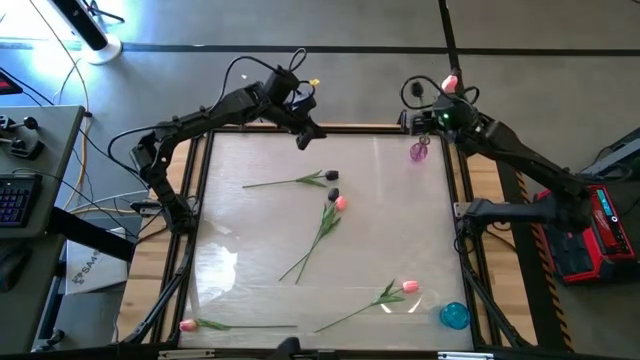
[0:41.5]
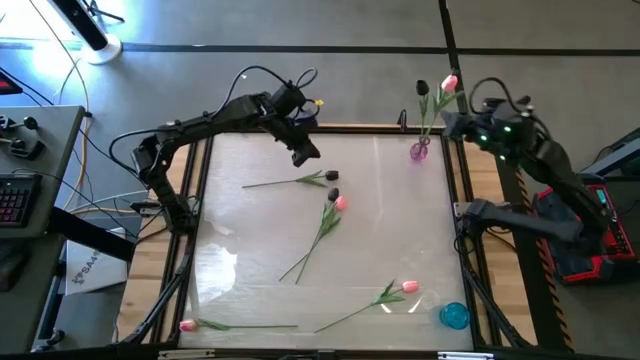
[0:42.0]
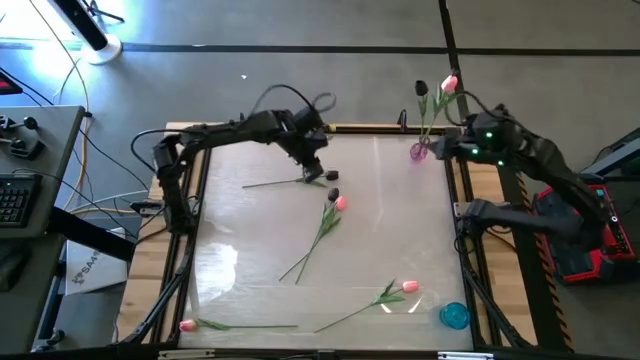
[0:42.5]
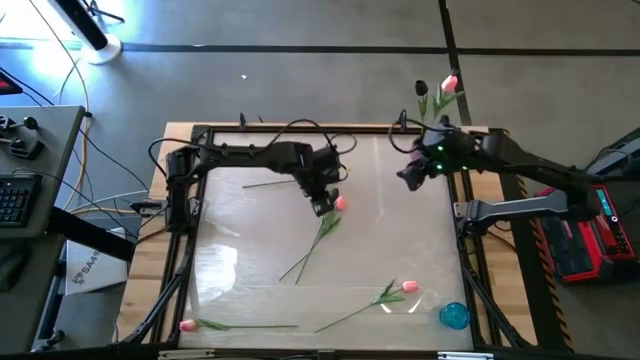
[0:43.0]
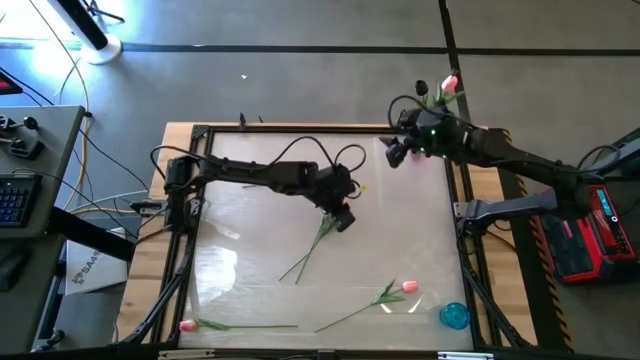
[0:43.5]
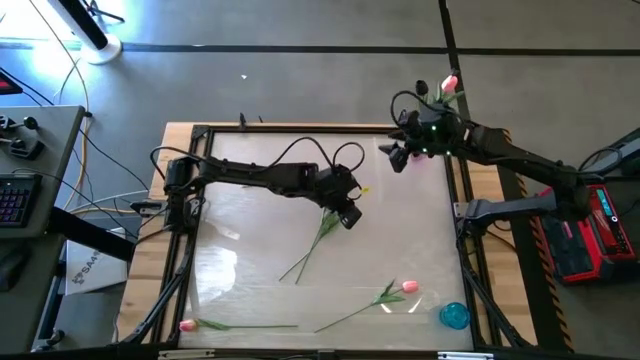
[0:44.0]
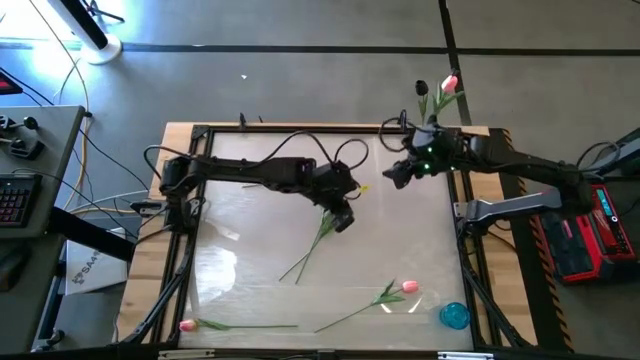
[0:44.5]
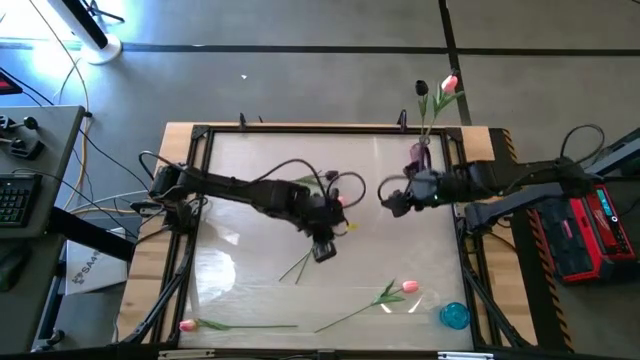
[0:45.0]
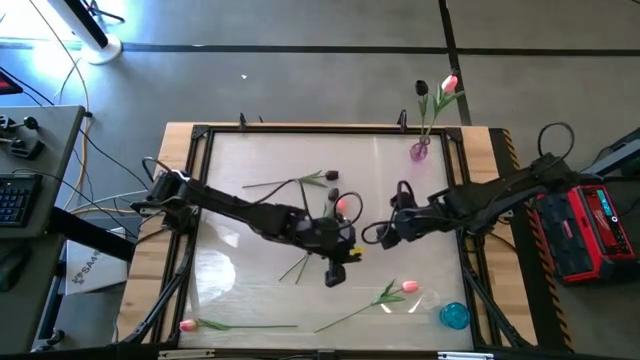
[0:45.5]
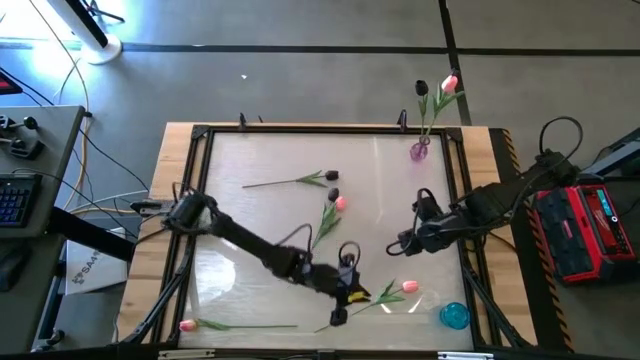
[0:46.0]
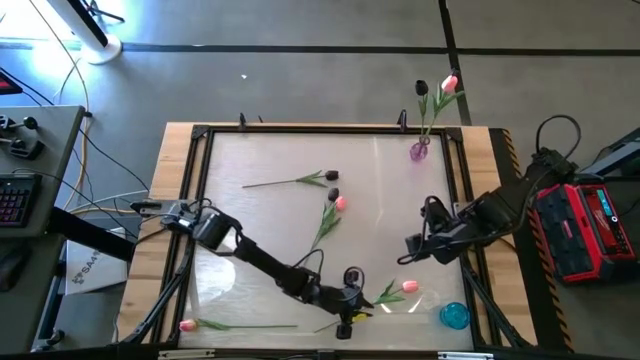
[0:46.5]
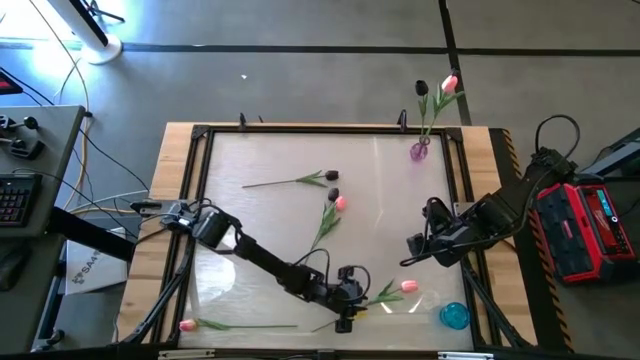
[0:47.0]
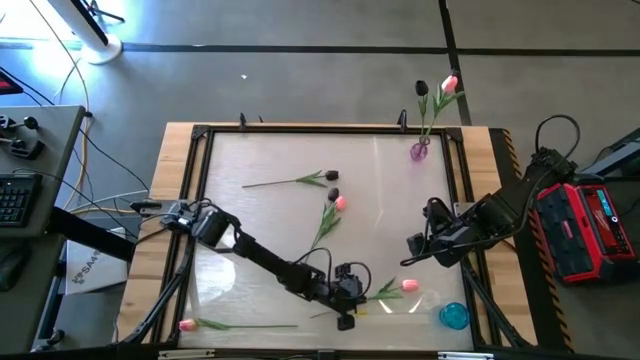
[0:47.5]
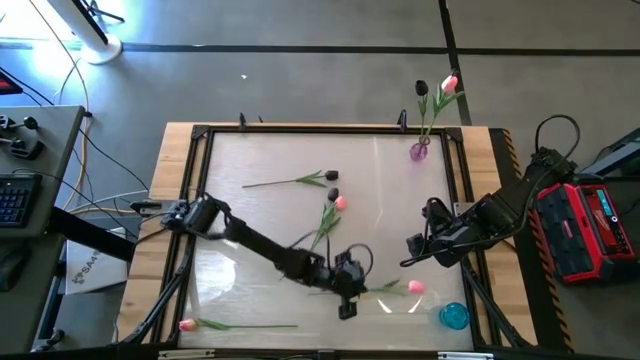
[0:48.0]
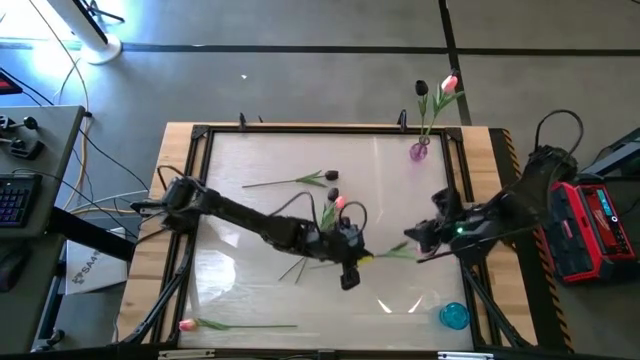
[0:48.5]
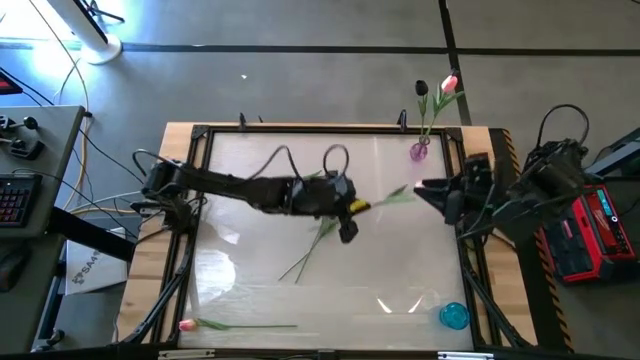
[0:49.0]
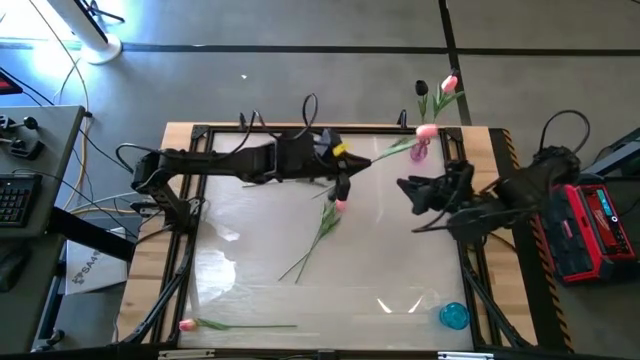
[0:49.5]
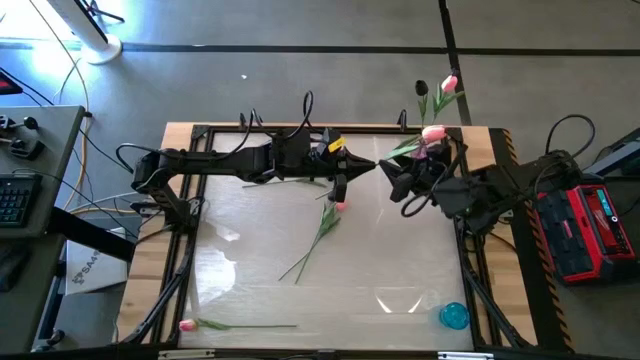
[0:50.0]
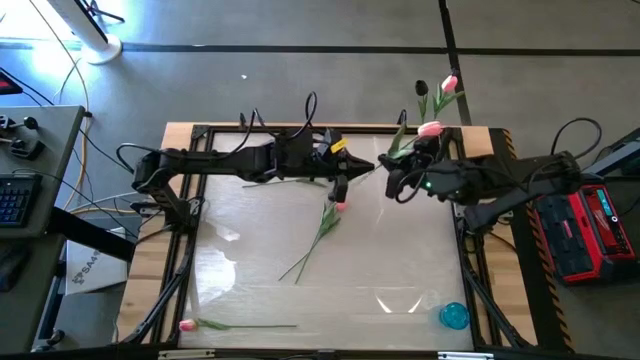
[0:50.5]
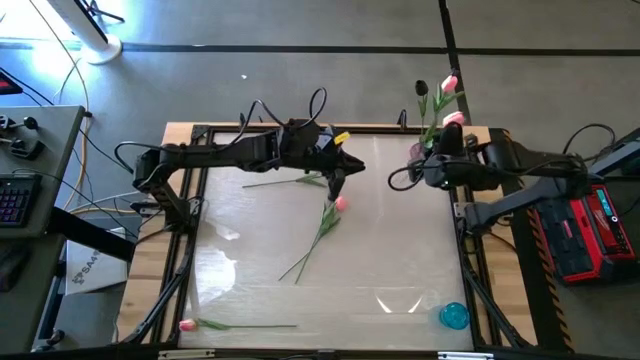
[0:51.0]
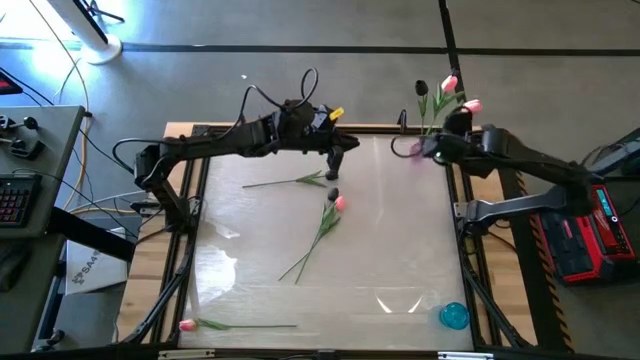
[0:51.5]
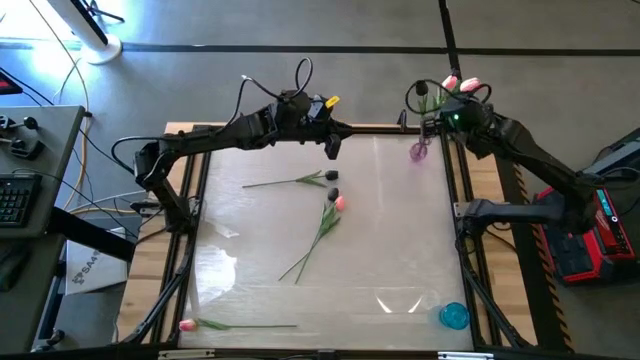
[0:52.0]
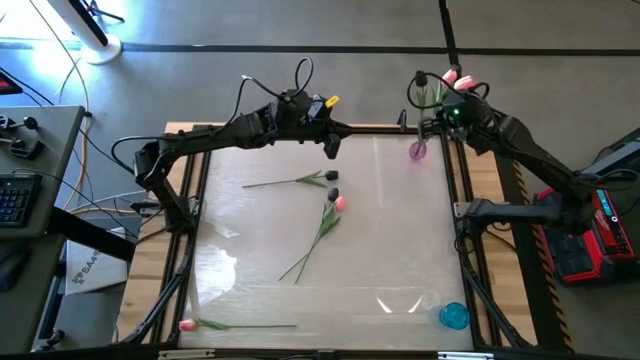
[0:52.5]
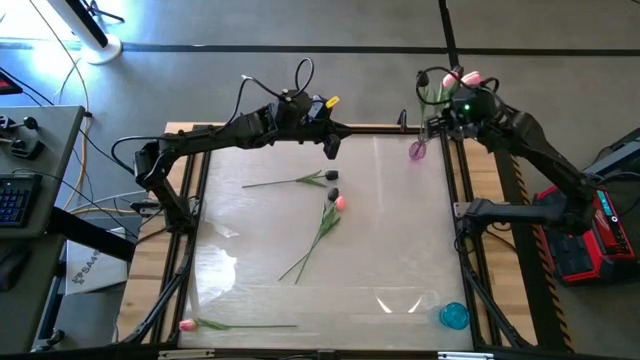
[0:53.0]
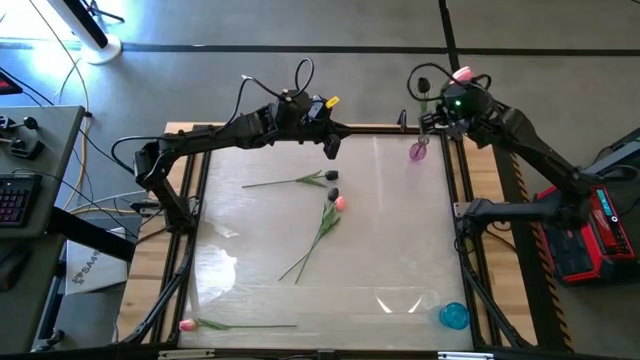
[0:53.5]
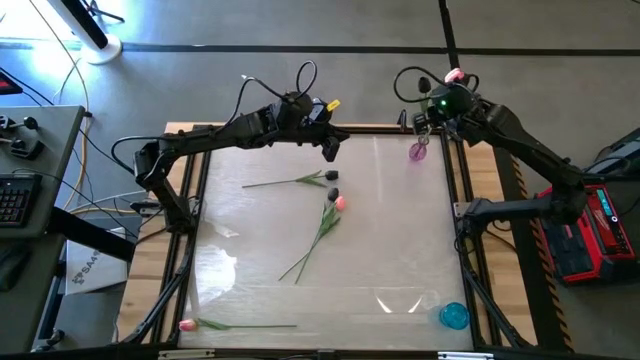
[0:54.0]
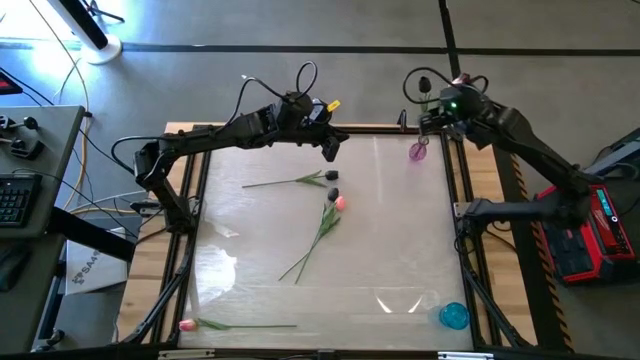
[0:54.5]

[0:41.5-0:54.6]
Task: Sort flowers into vase by color
Put the bottom right pink flower into the purple vase

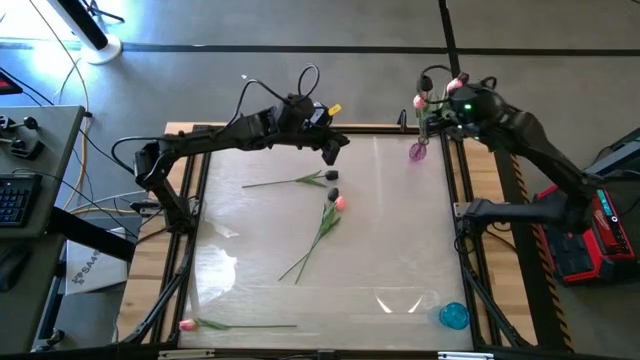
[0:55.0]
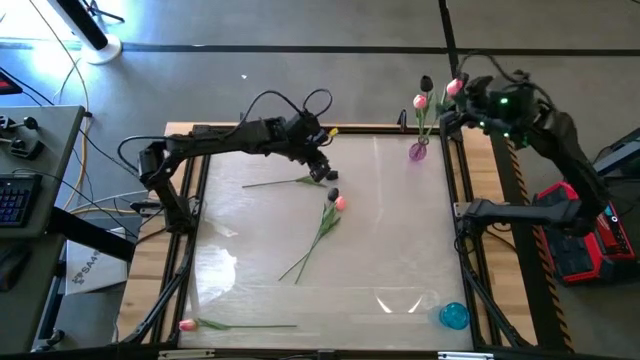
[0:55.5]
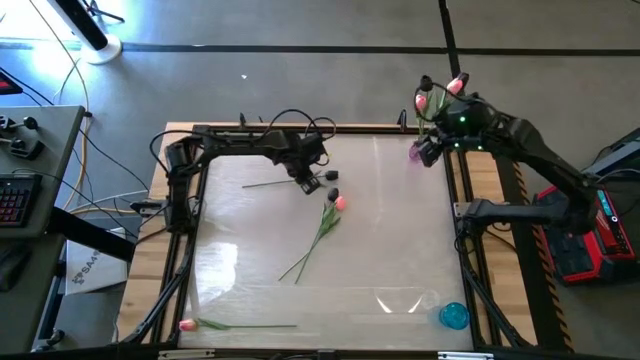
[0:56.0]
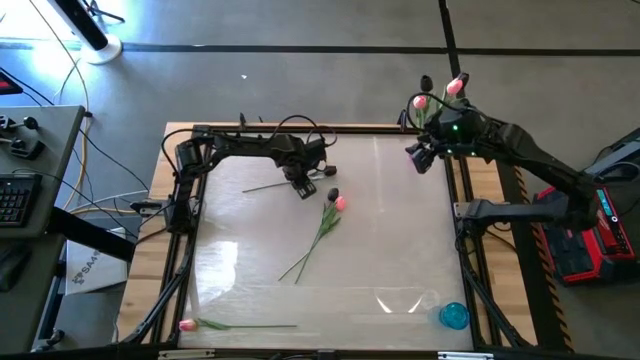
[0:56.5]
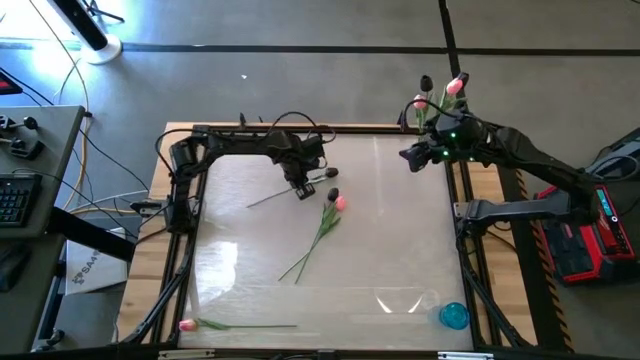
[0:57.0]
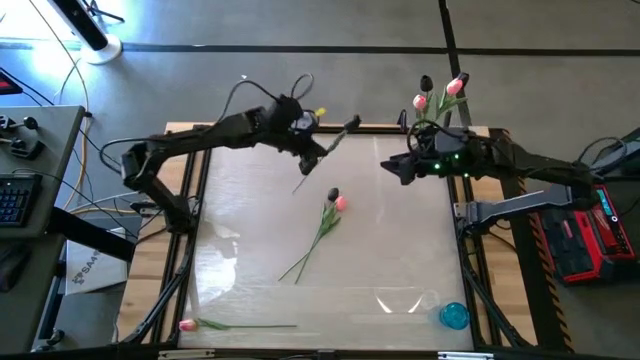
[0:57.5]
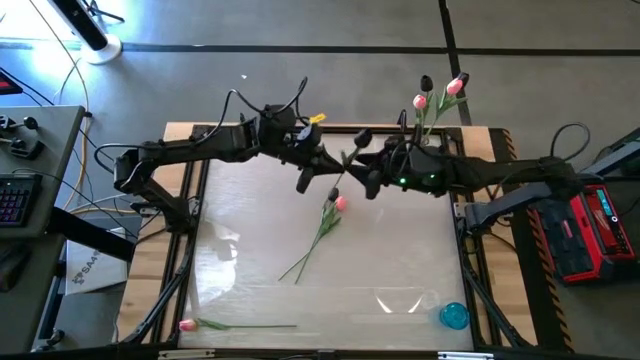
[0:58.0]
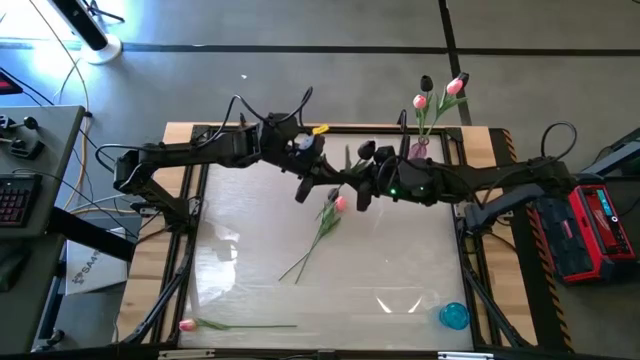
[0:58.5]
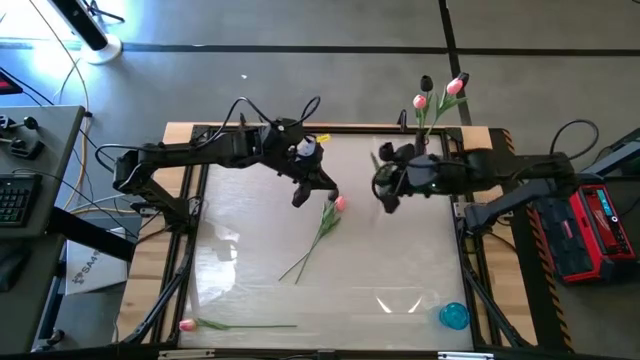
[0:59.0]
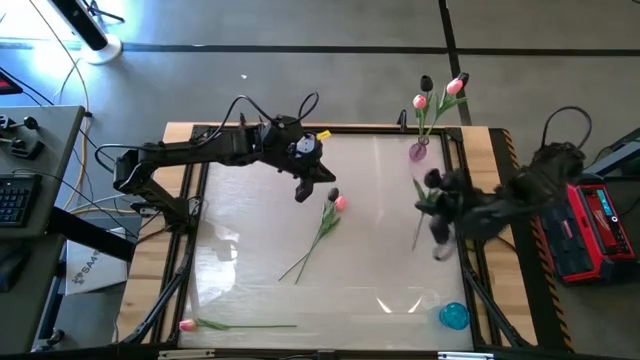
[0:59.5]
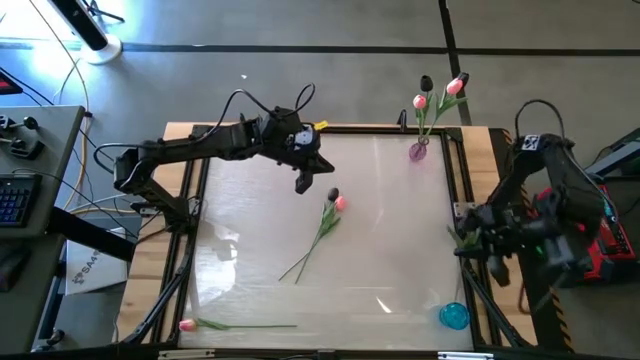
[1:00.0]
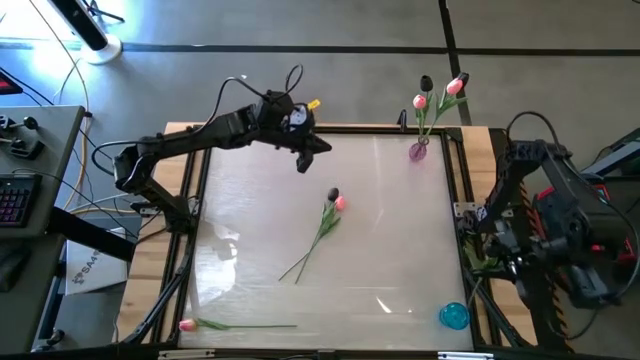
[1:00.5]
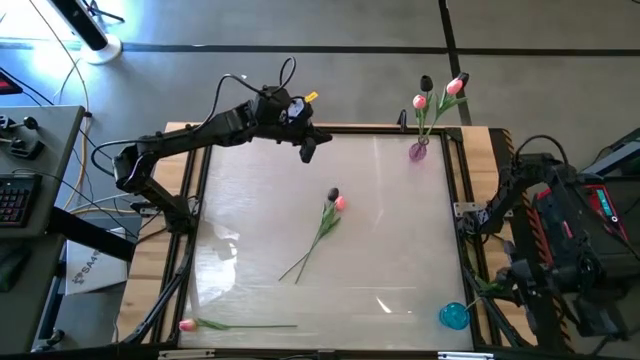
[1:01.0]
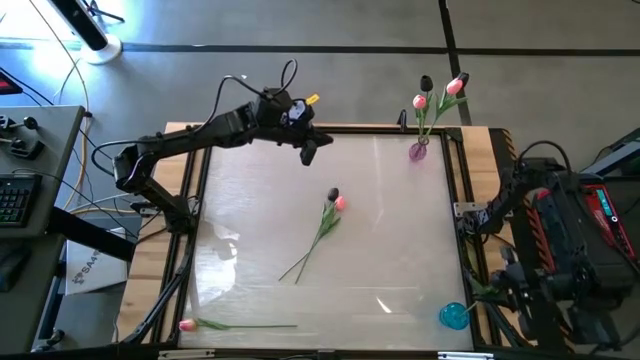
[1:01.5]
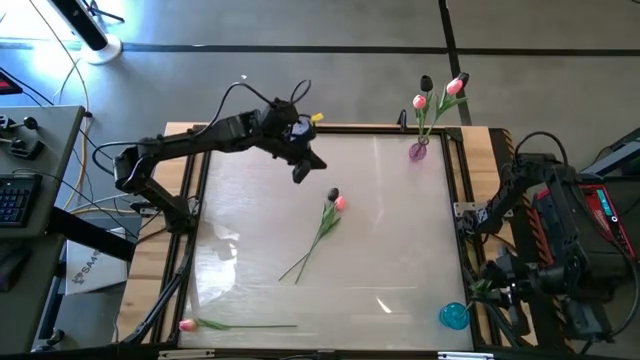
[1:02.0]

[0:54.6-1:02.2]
Put the top black flower into the blue vase
